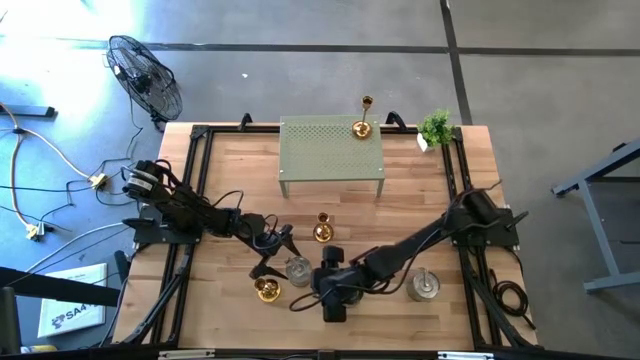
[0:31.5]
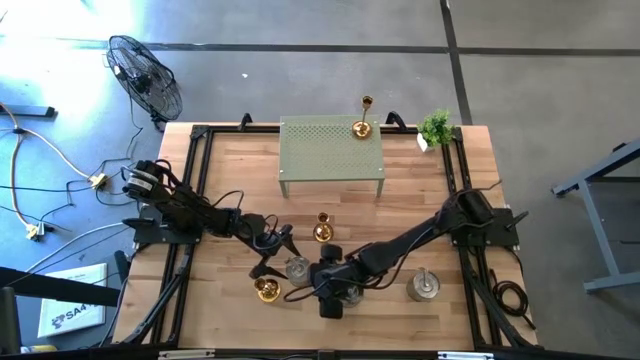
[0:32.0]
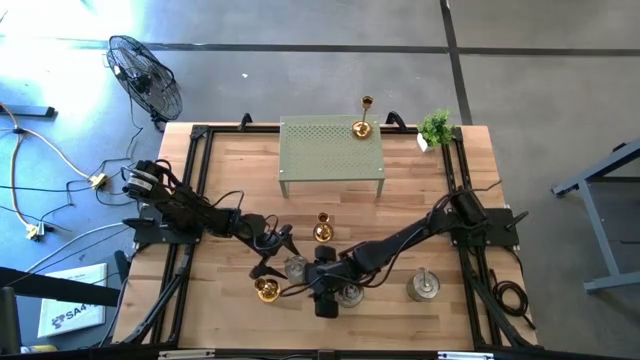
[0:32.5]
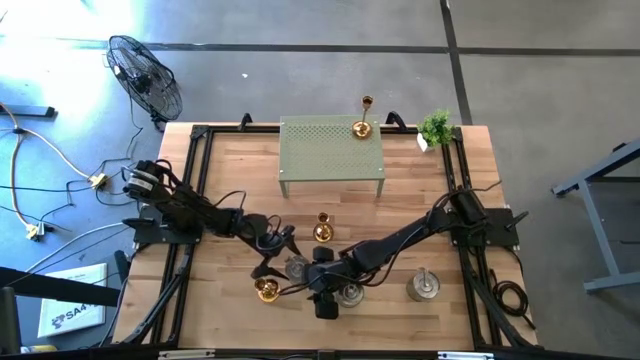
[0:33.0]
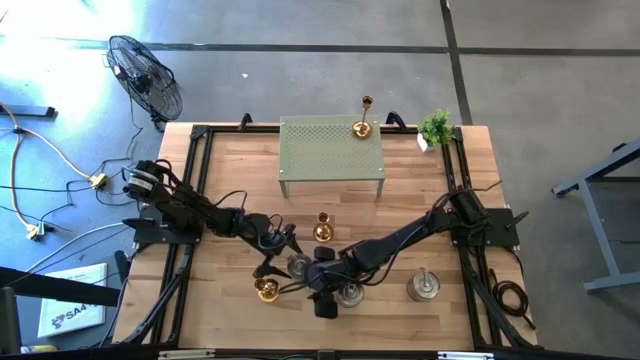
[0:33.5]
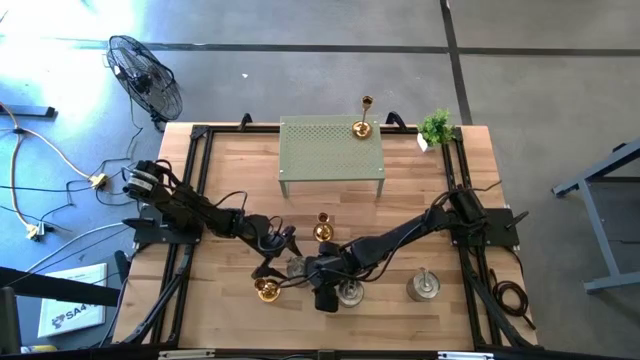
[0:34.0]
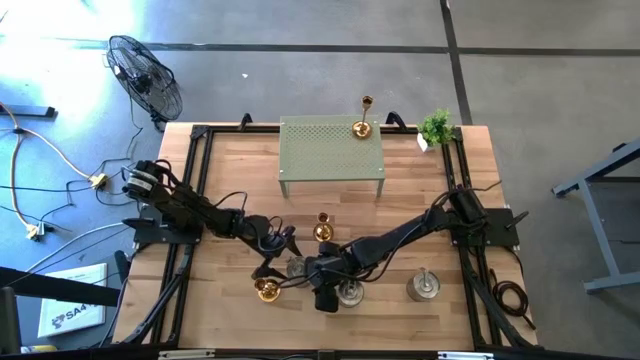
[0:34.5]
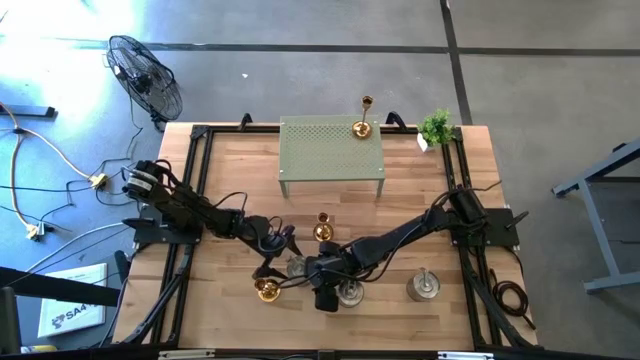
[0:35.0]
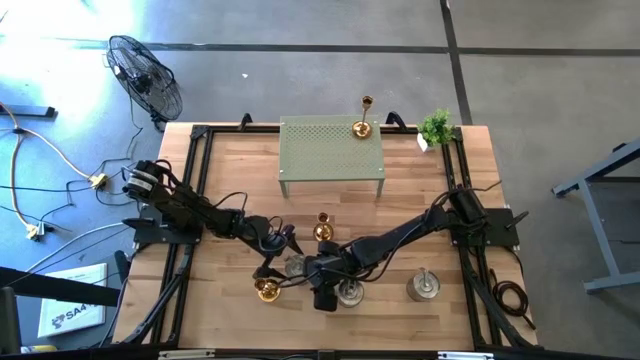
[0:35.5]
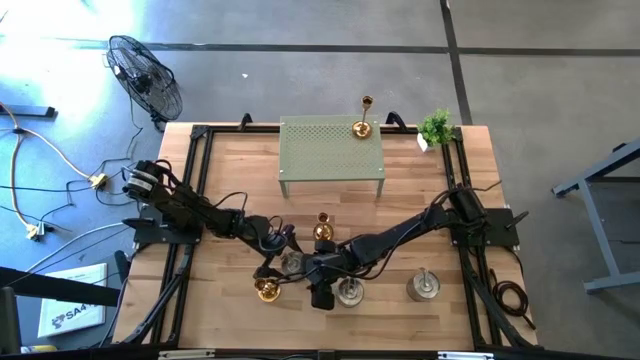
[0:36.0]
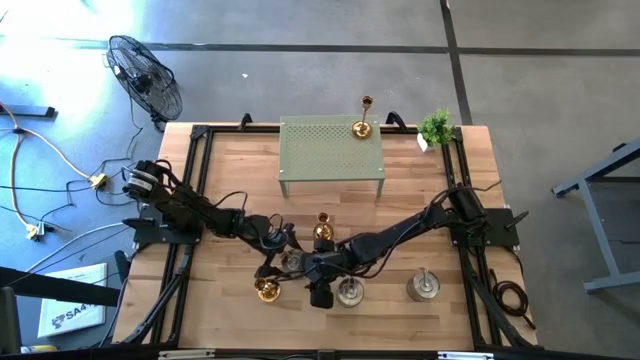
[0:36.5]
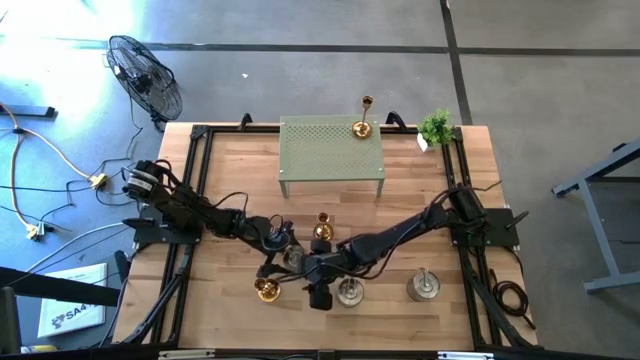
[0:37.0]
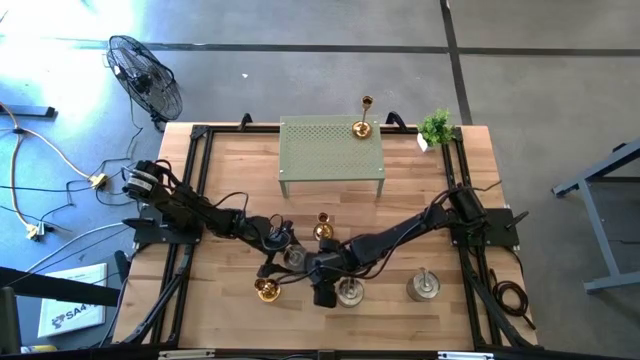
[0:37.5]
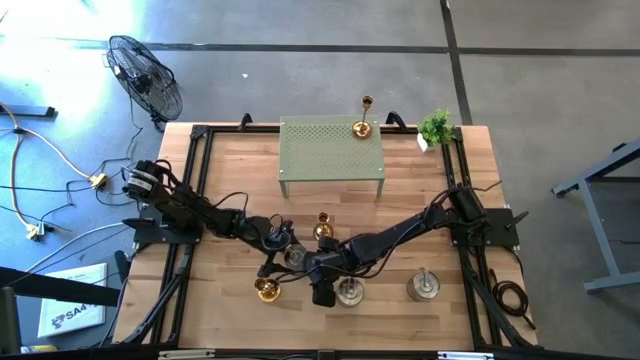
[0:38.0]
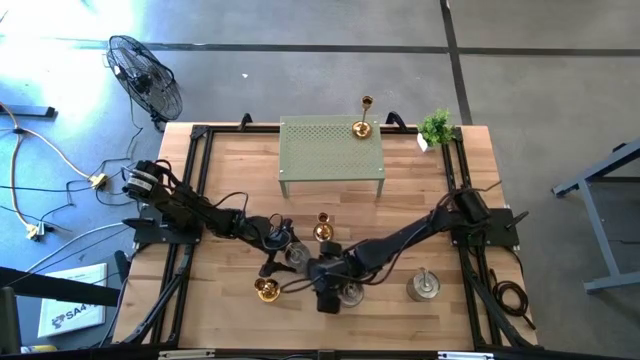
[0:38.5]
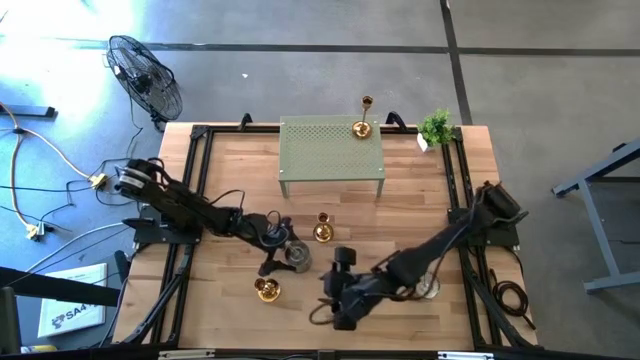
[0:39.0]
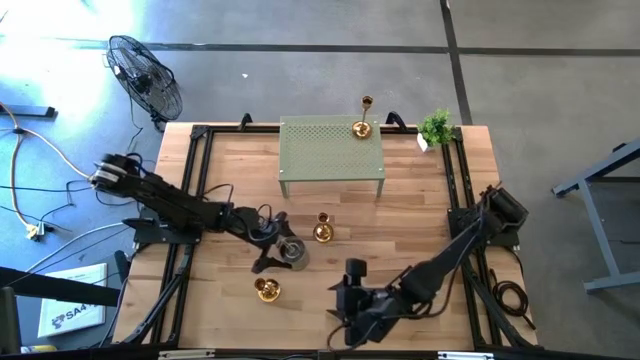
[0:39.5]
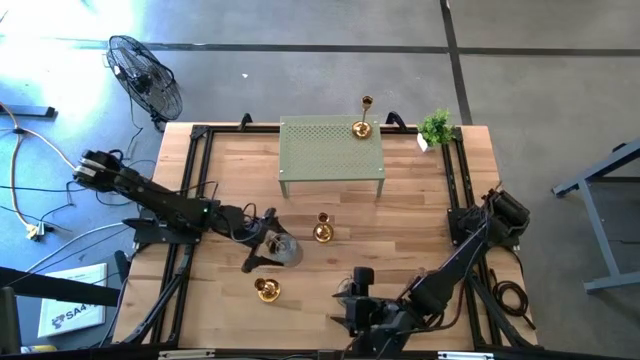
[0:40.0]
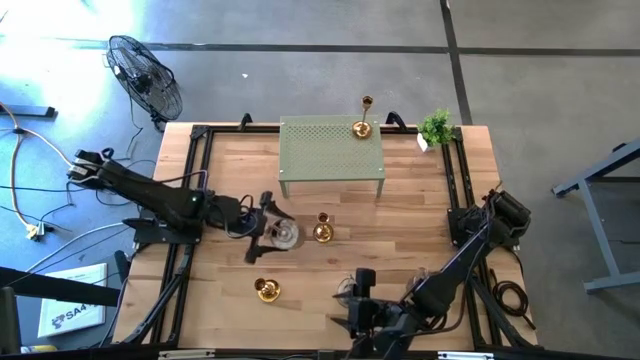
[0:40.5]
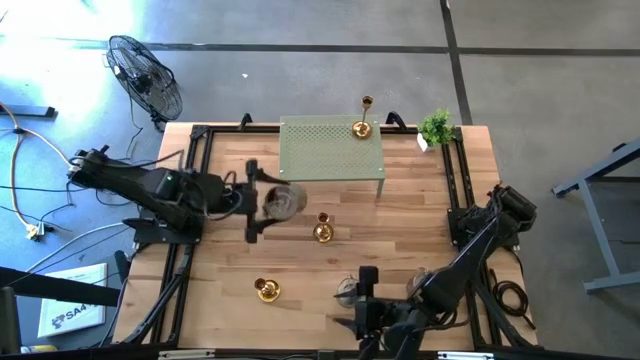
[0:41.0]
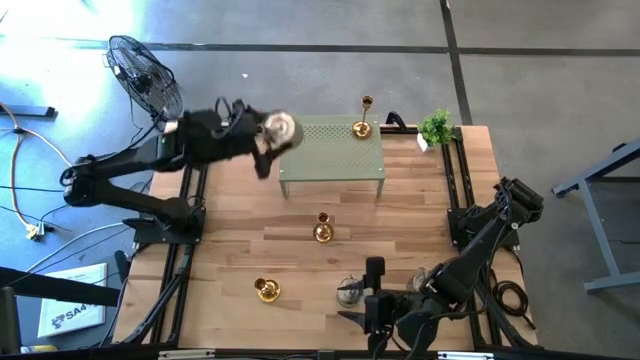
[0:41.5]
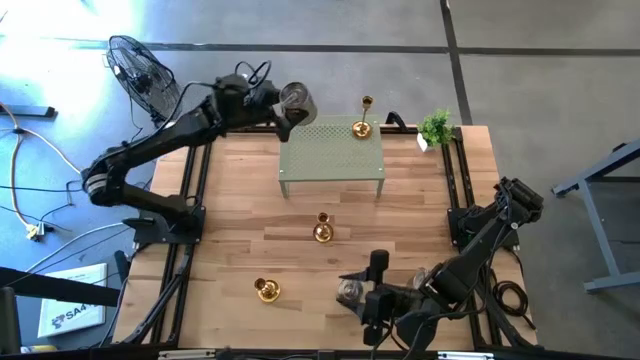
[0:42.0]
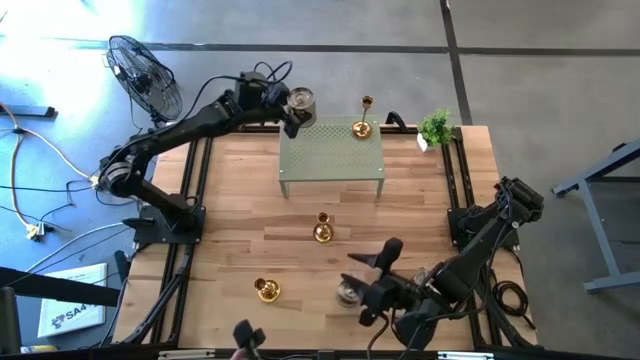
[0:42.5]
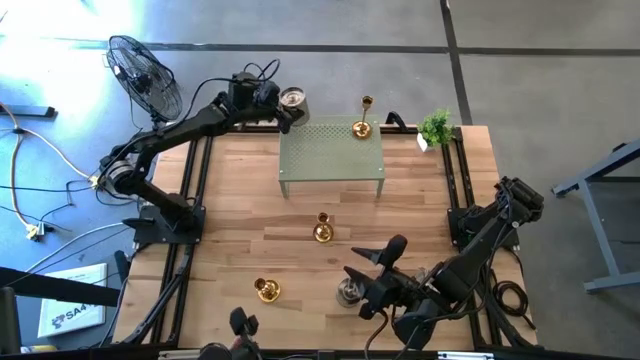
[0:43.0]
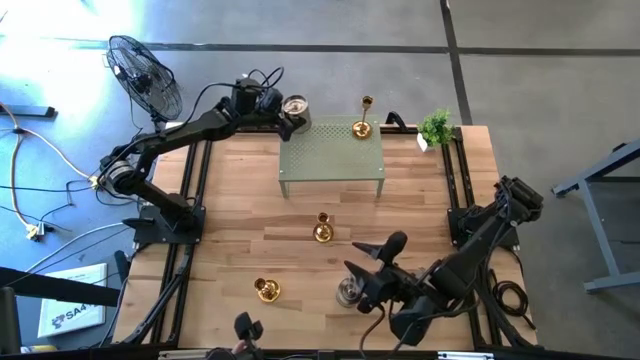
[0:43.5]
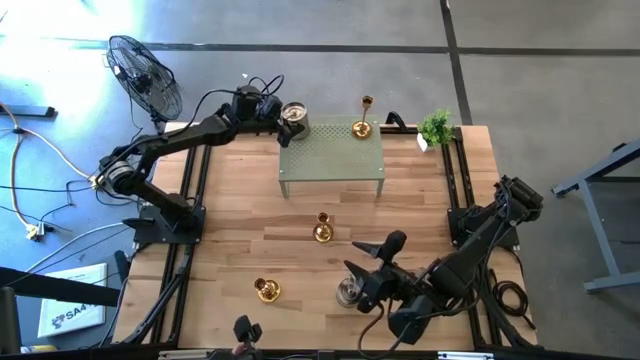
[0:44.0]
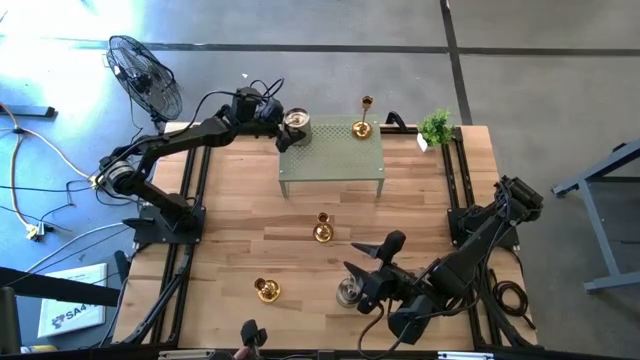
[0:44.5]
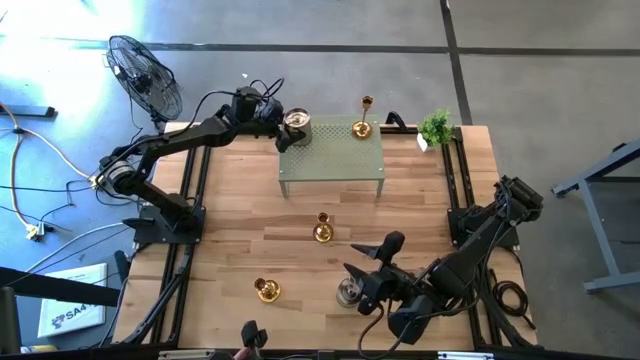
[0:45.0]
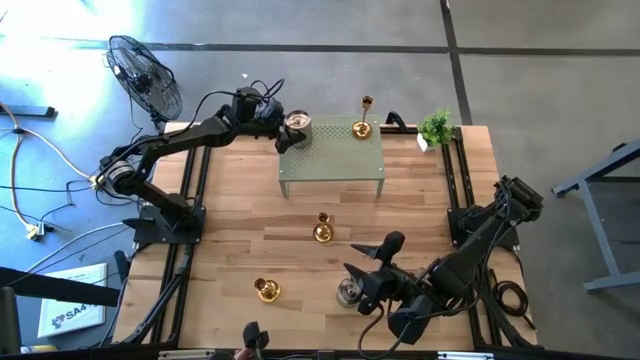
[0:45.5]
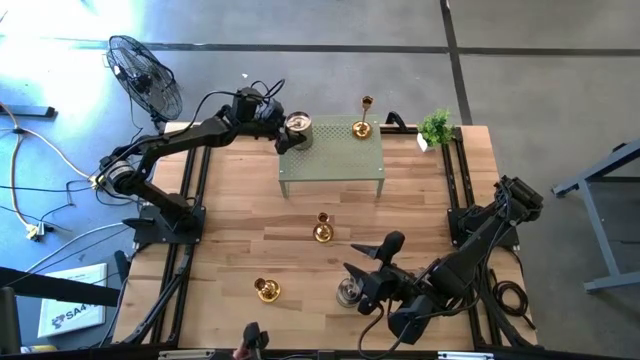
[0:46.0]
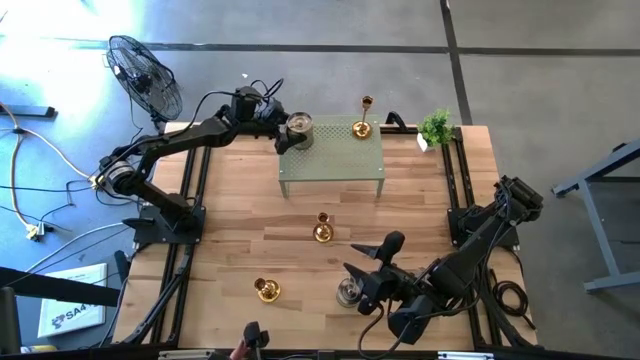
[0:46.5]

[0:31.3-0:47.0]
Task: Pick & Place candle stick holders
Put the top silver scented candle on the shelf

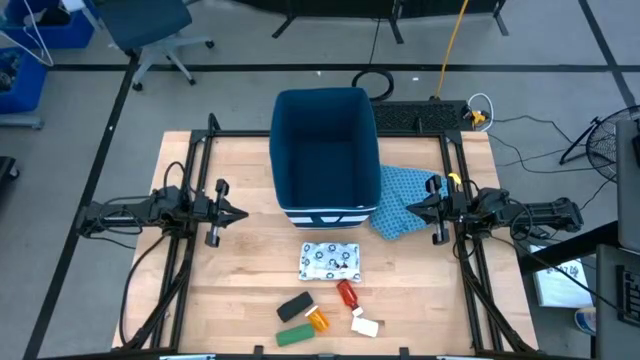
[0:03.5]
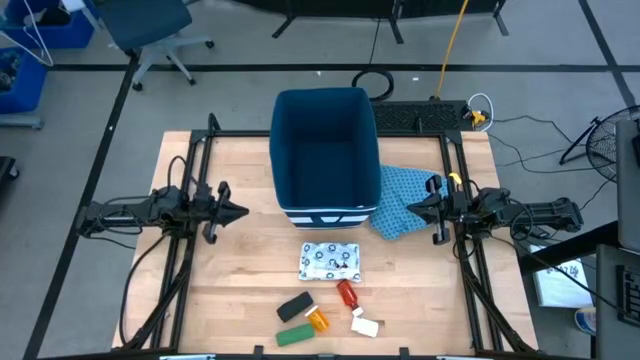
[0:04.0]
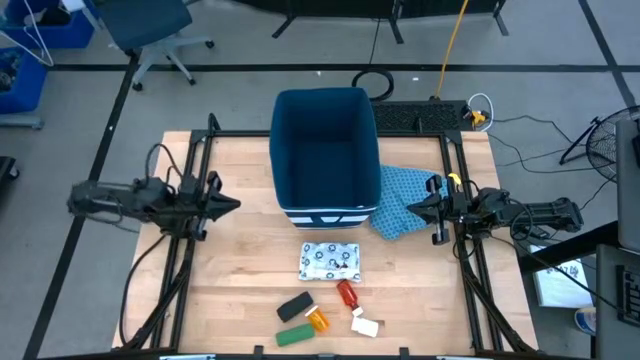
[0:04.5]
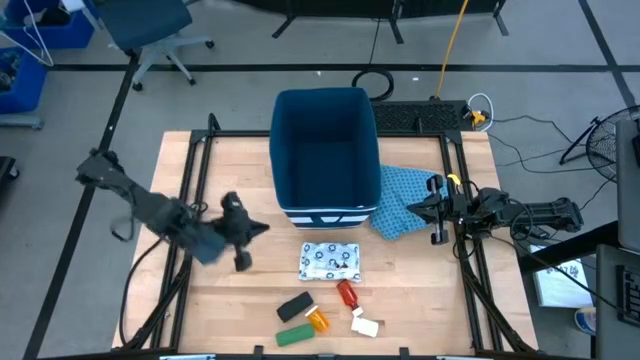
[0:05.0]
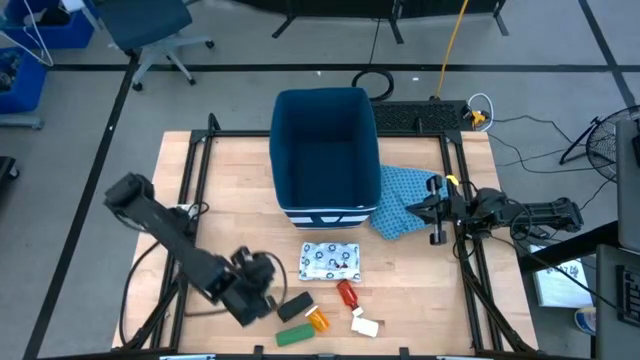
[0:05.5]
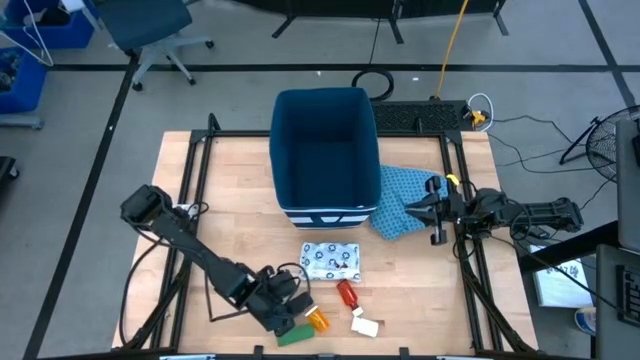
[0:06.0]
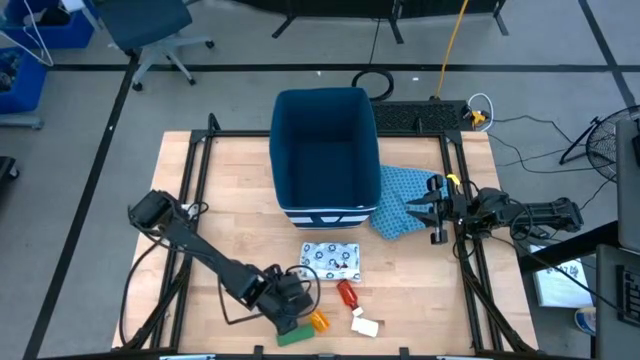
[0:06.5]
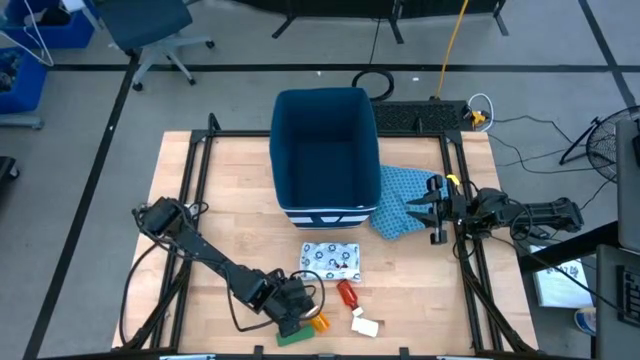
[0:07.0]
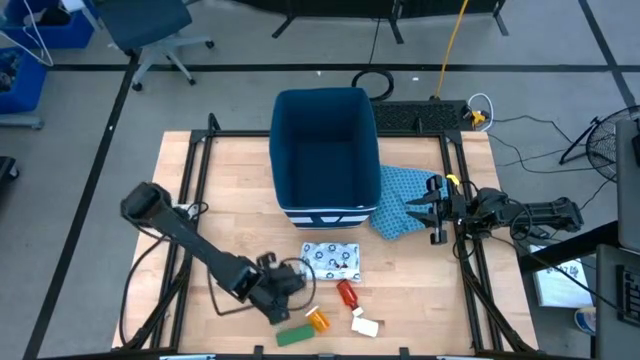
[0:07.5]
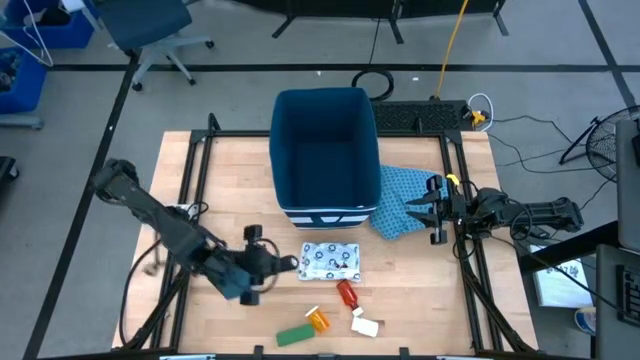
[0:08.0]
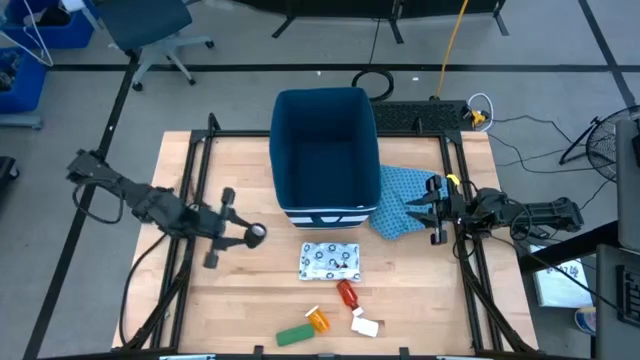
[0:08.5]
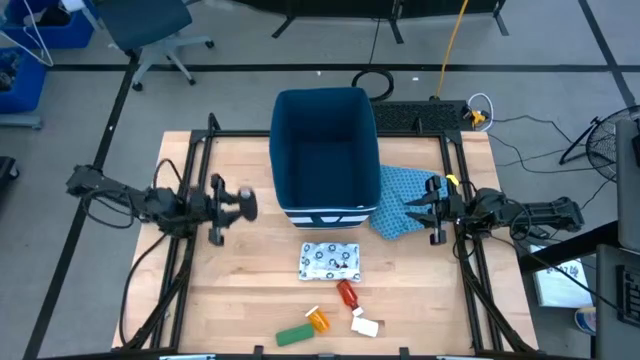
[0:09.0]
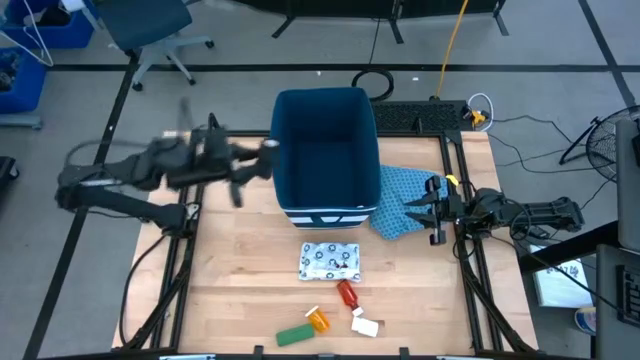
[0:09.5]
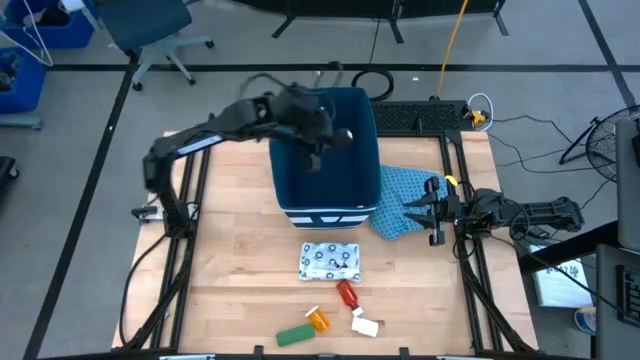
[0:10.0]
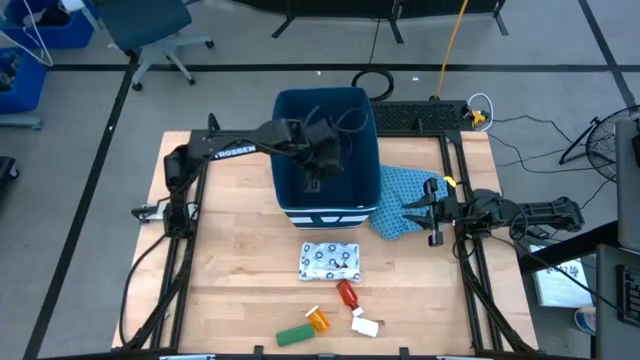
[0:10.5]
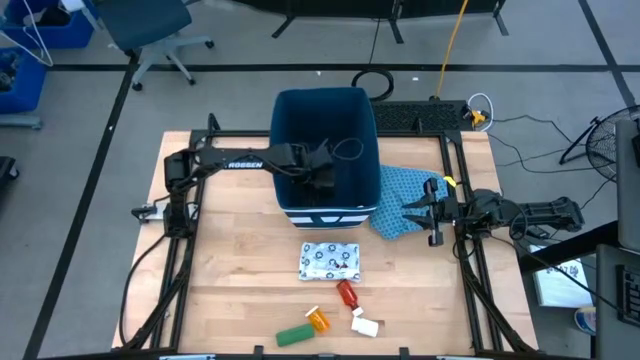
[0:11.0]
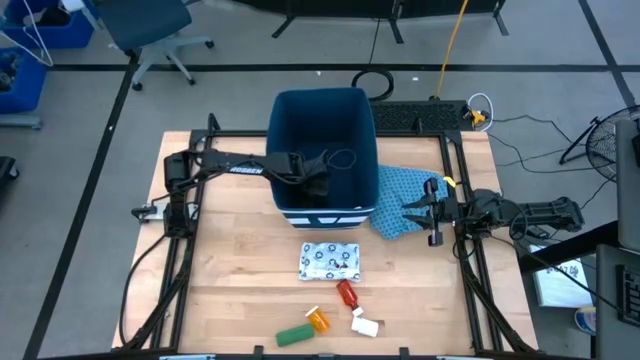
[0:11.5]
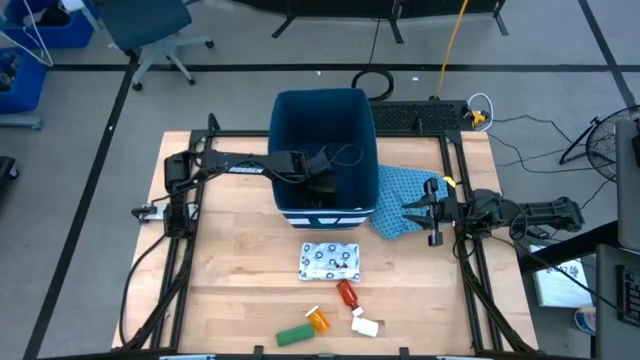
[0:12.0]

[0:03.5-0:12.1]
Task: Pick & place medical supplies in basket/bin
Put the black bandage into the blue bin
